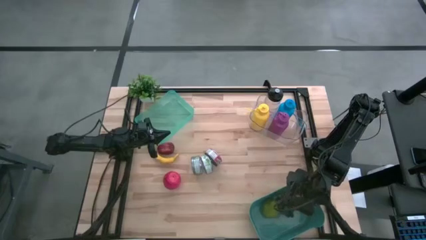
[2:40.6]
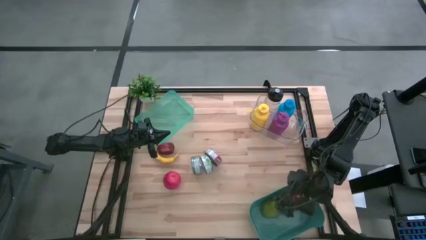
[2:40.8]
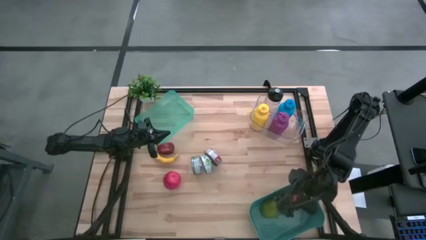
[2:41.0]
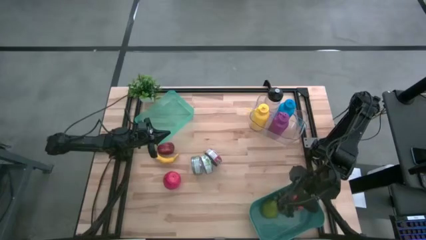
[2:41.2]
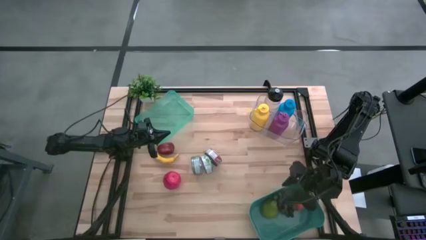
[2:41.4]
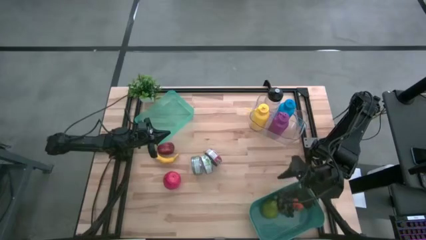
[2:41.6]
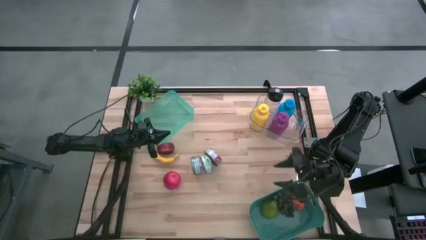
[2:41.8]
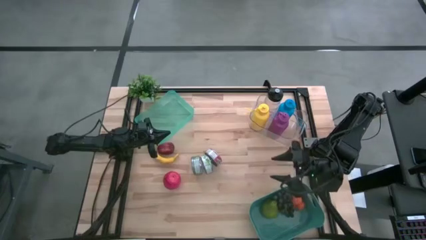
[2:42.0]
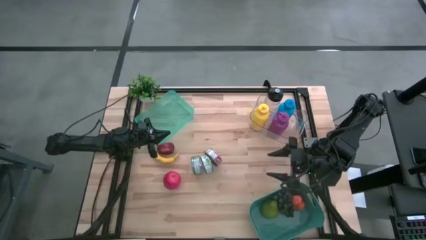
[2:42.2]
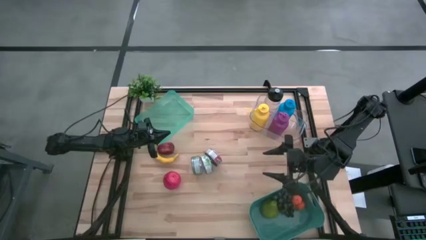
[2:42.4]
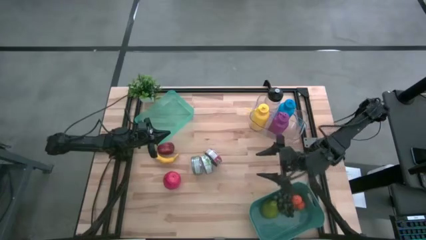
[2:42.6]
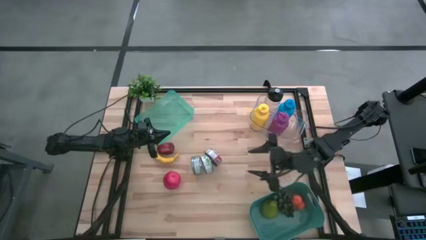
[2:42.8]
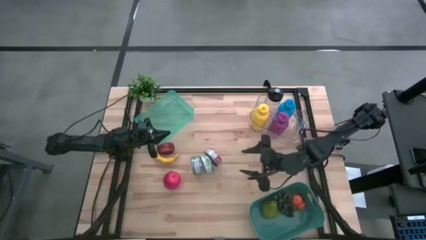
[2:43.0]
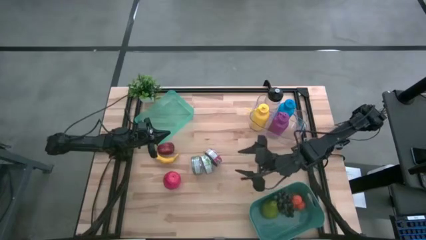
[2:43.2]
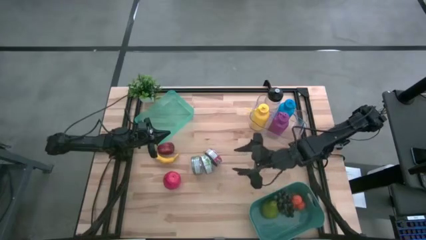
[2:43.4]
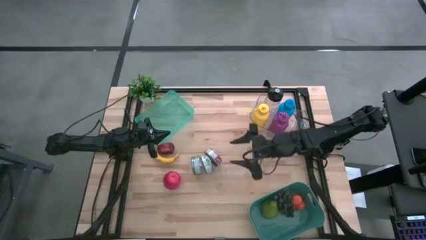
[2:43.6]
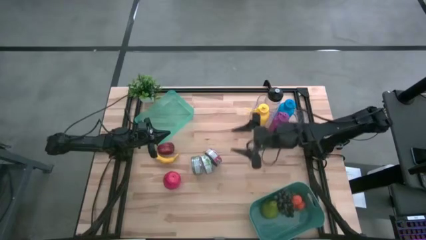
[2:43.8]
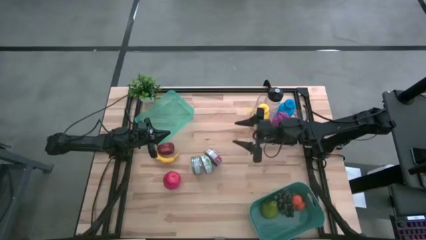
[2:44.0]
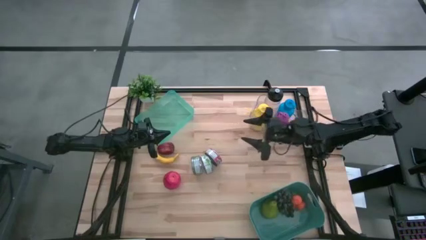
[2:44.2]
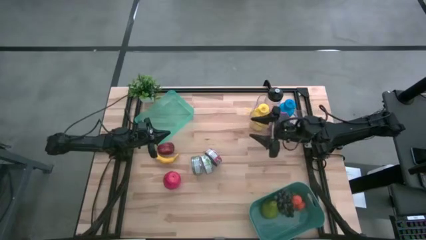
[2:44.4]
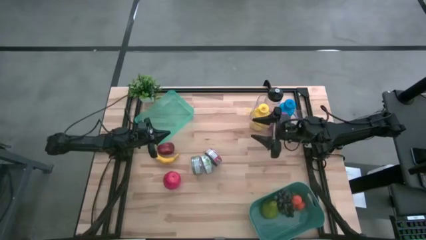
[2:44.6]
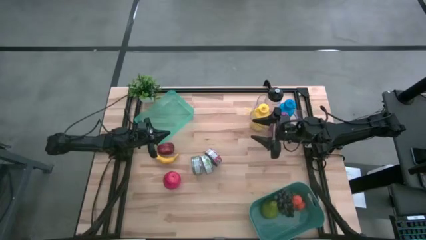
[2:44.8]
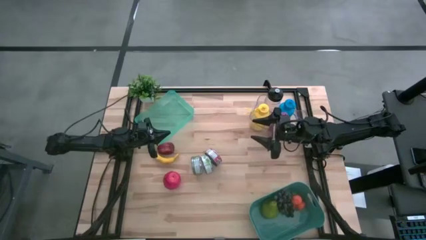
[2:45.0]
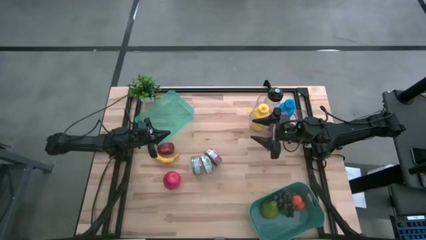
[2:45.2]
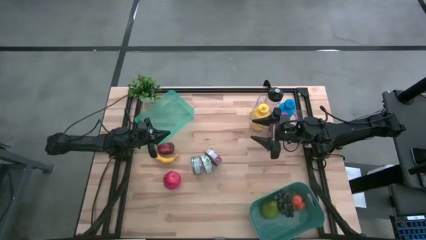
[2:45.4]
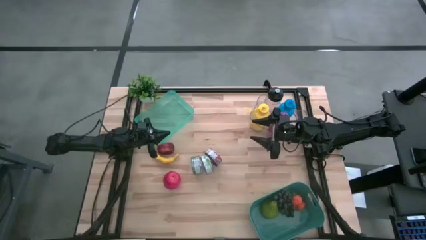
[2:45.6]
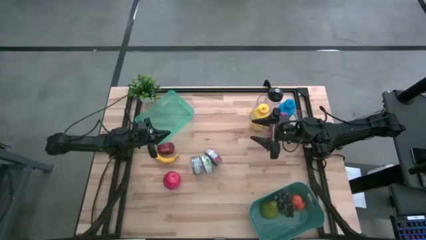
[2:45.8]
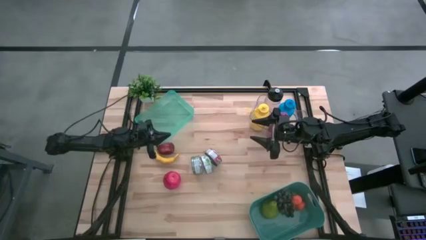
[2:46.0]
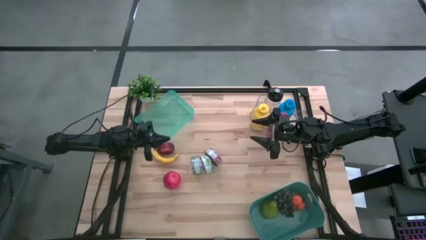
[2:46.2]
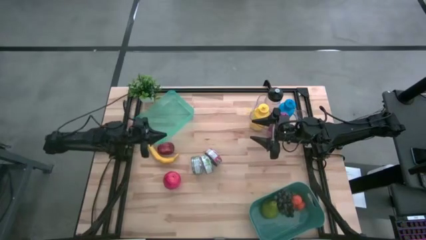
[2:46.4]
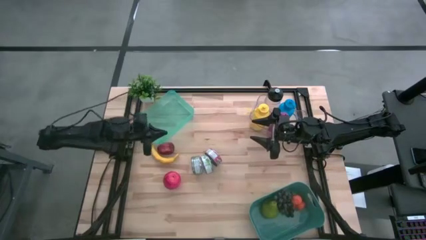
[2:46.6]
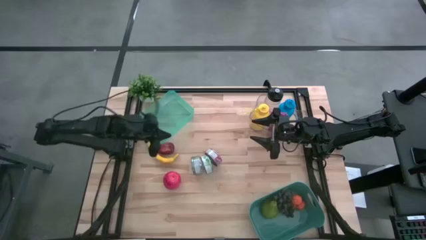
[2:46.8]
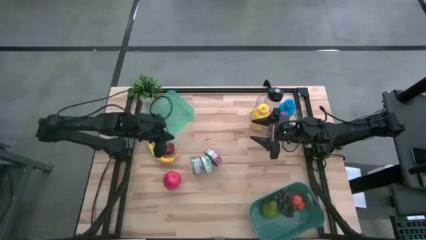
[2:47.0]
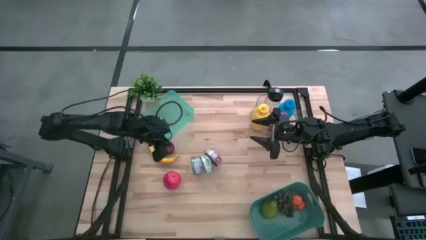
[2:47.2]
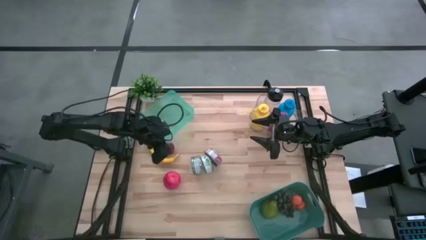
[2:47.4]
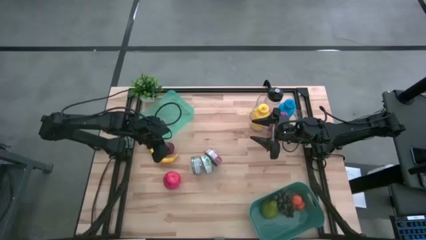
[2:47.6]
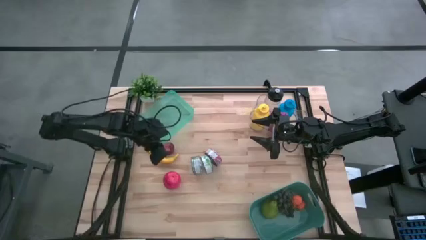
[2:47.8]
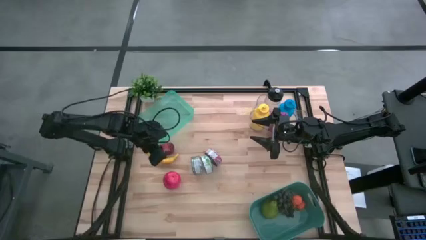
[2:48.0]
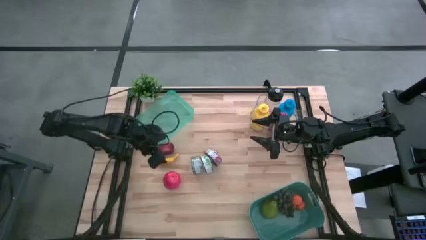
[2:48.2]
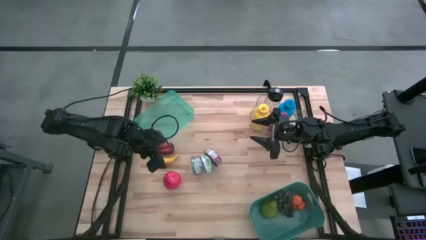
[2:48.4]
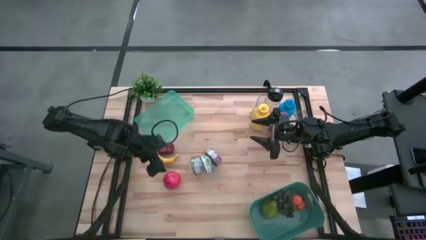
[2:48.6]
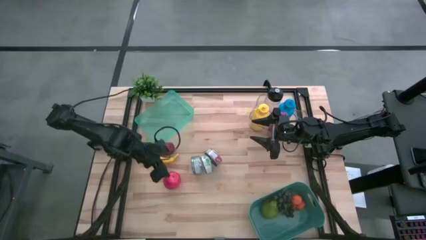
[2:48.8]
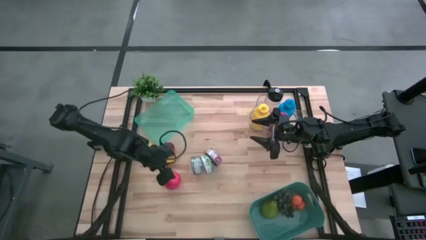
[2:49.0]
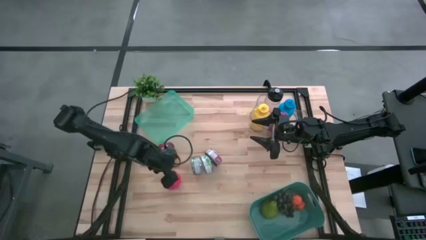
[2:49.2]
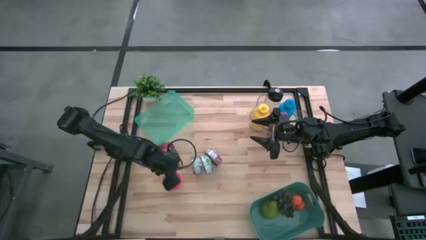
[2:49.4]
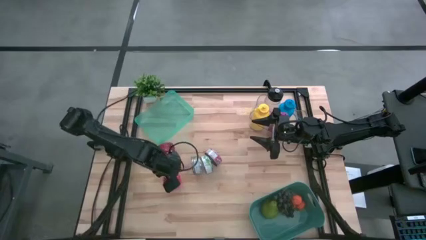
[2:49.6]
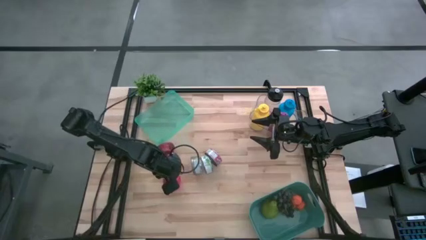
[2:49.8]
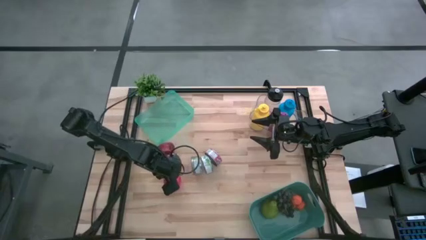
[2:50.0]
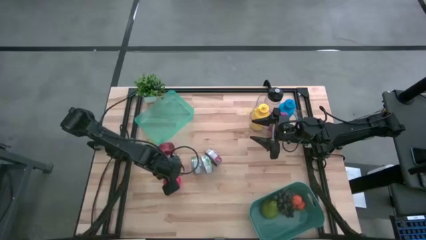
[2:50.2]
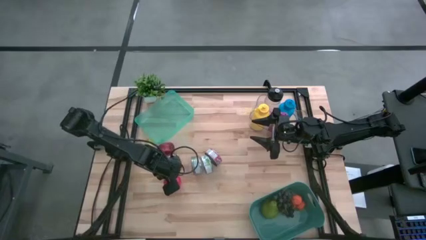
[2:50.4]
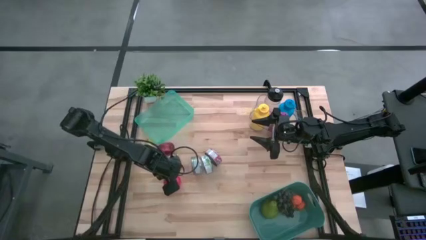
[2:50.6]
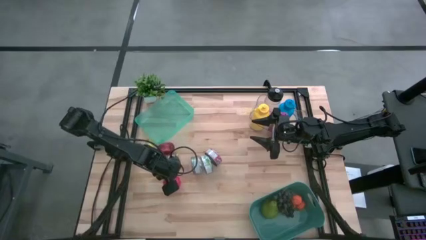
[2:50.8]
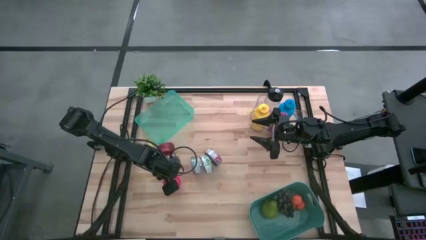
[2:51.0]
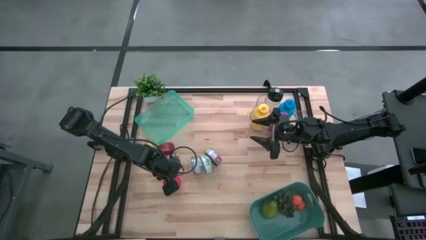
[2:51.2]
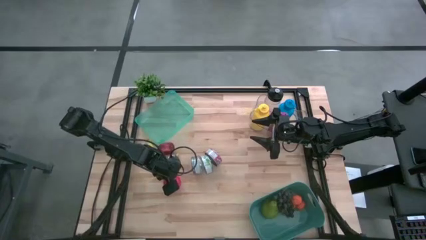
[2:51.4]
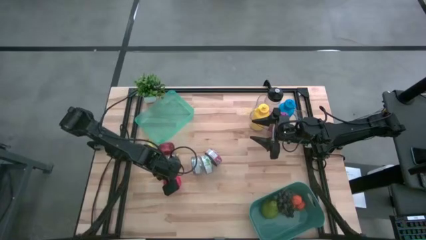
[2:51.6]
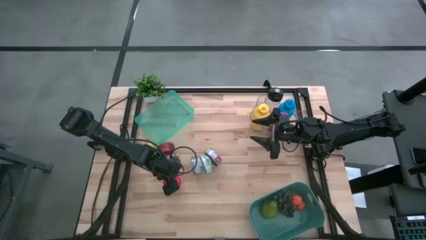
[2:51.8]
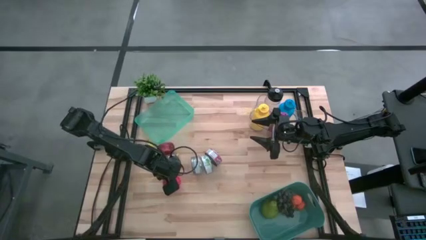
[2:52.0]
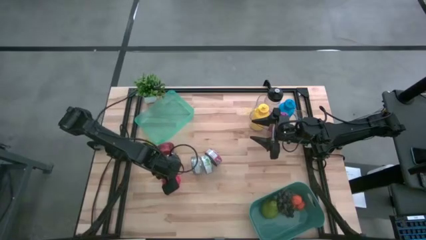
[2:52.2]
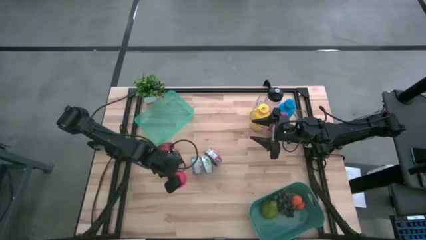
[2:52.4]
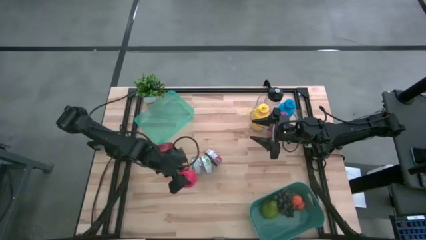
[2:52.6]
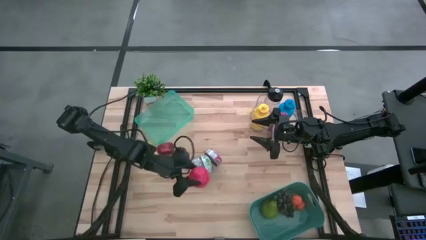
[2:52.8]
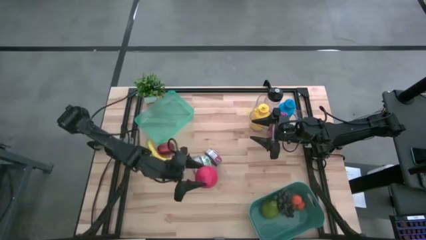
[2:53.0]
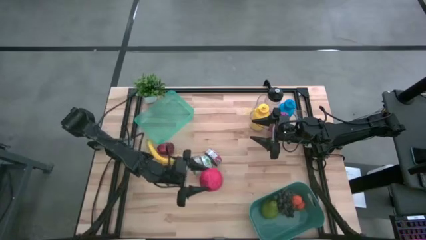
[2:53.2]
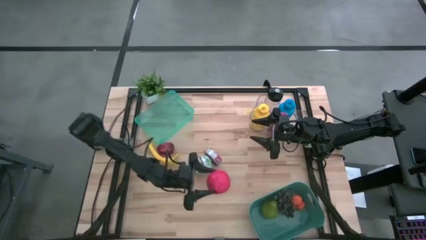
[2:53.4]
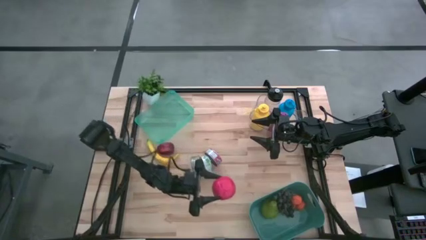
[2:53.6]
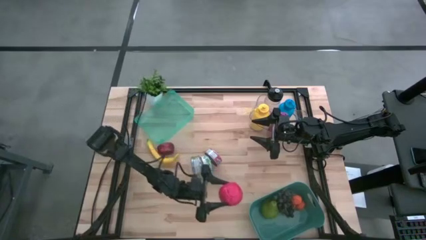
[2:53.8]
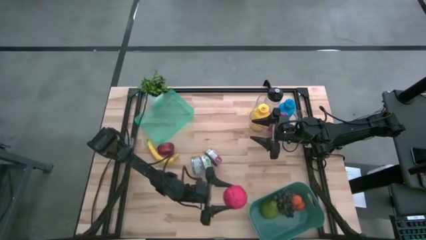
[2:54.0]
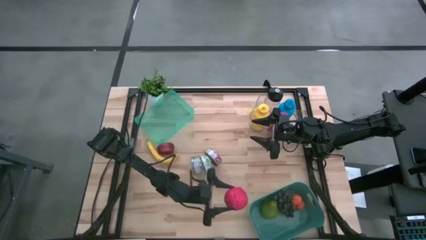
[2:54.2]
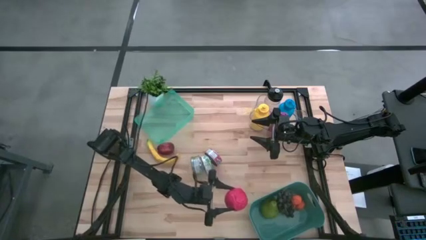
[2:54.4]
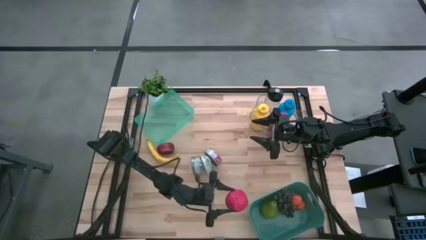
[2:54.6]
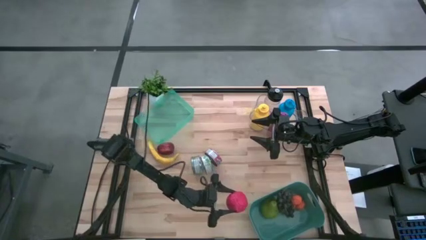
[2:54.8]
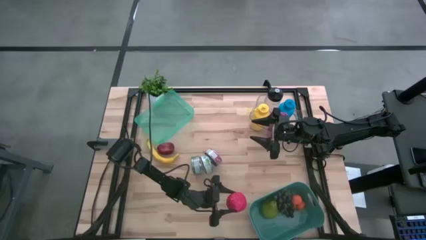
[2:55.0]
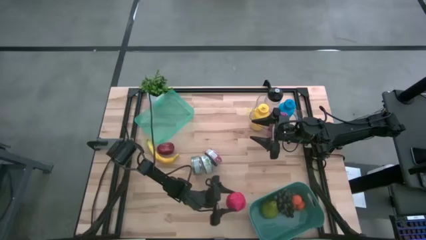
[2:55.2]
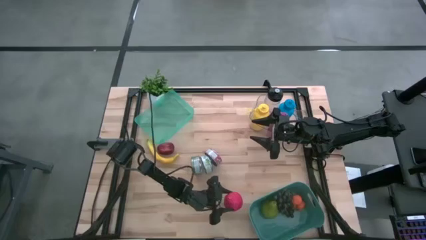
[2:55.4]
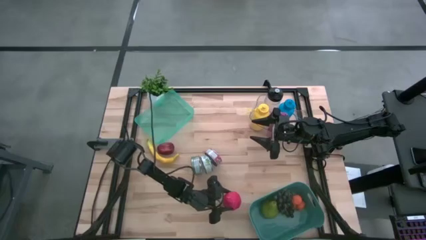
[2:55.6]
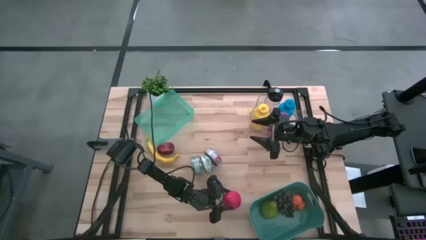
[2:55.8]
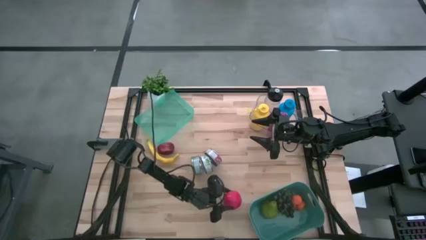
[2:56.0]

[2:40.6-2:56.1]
Task: Pick & Place Food Item
Put the bottom red apple into the dark green bin
